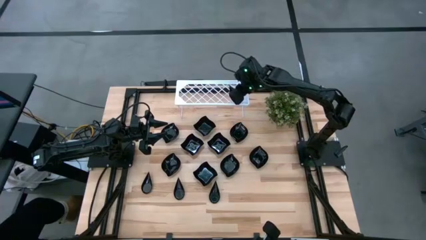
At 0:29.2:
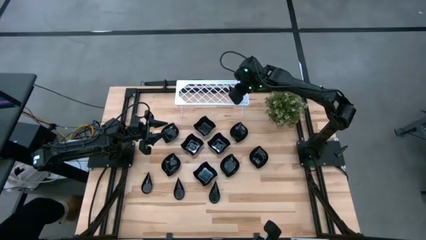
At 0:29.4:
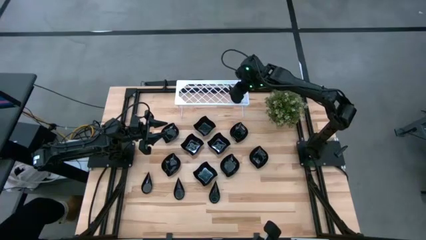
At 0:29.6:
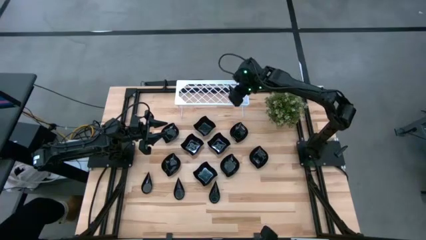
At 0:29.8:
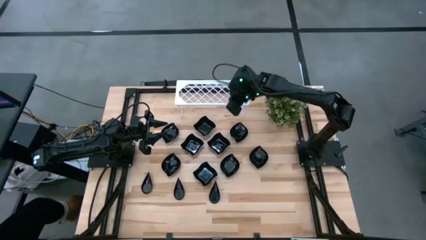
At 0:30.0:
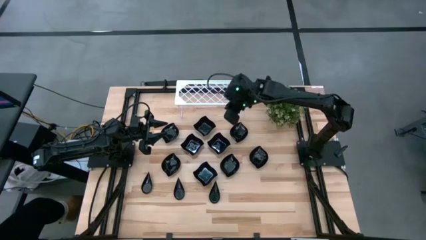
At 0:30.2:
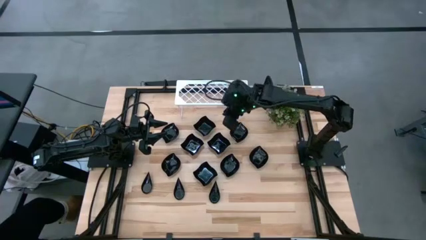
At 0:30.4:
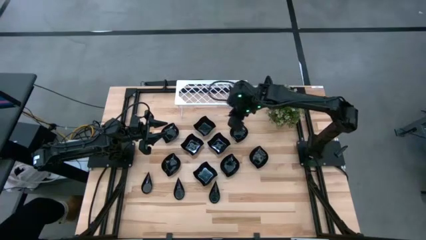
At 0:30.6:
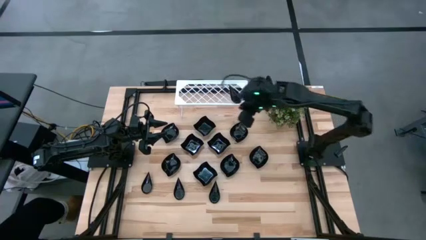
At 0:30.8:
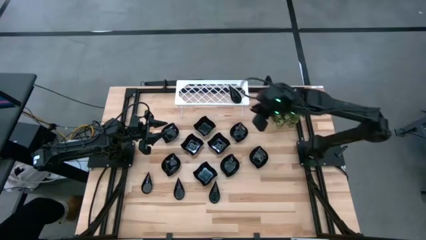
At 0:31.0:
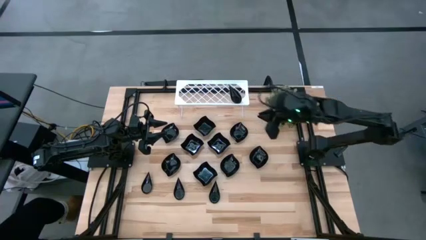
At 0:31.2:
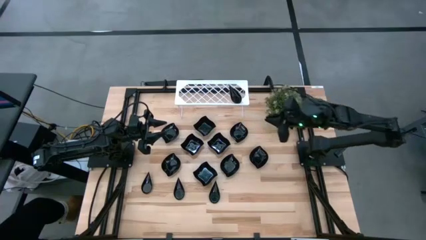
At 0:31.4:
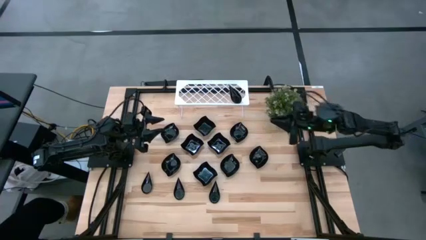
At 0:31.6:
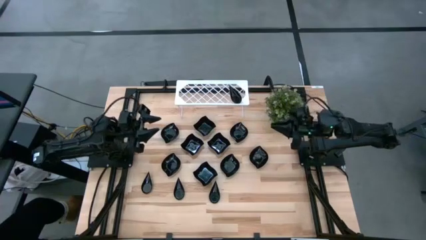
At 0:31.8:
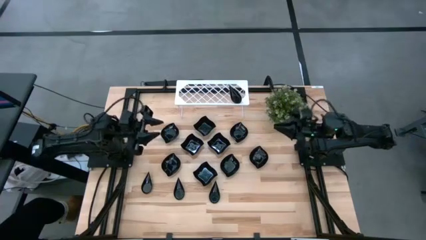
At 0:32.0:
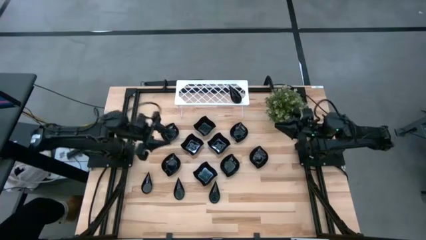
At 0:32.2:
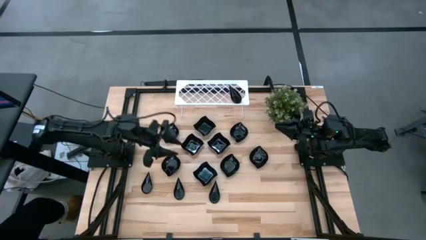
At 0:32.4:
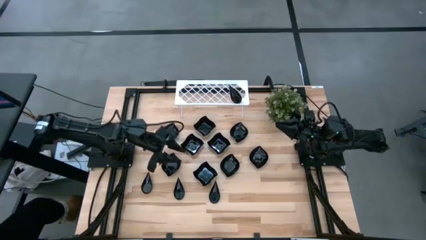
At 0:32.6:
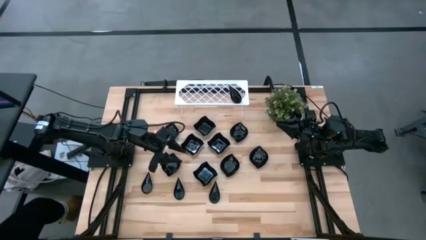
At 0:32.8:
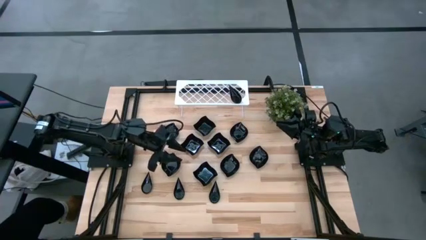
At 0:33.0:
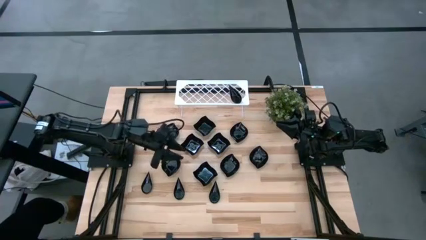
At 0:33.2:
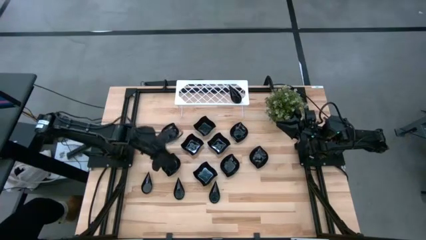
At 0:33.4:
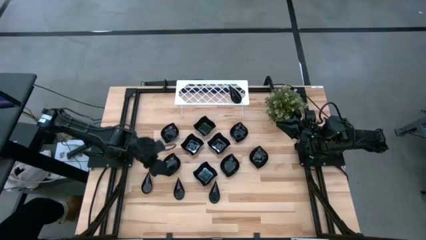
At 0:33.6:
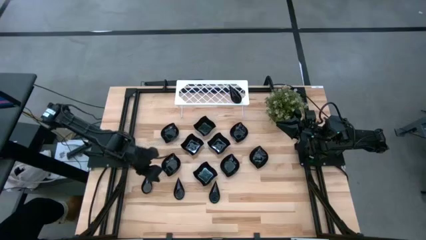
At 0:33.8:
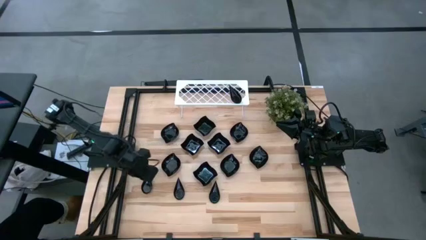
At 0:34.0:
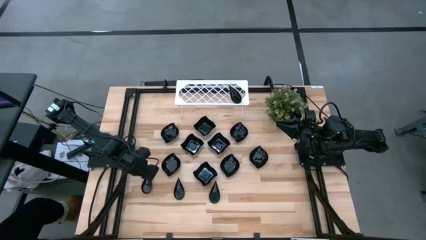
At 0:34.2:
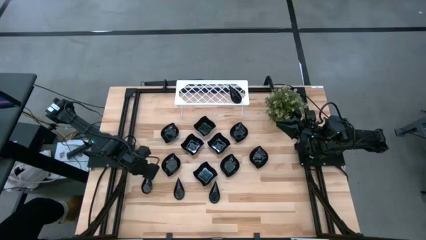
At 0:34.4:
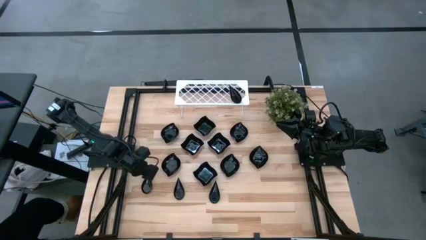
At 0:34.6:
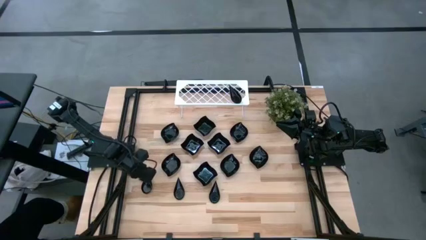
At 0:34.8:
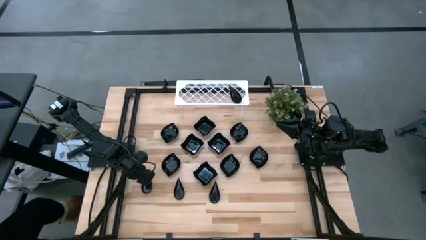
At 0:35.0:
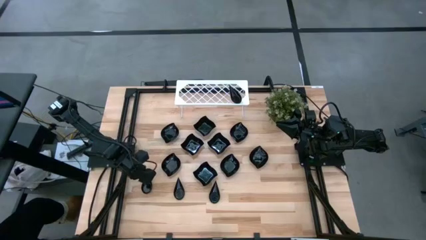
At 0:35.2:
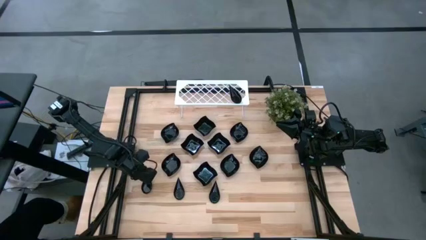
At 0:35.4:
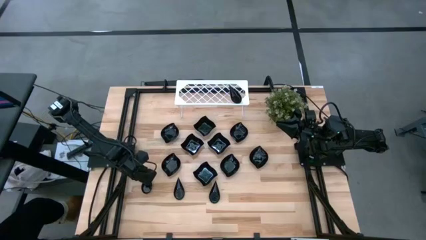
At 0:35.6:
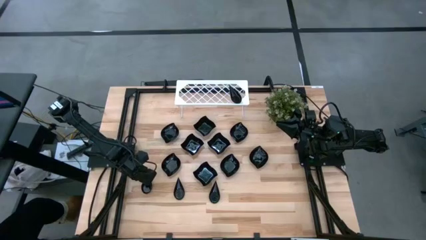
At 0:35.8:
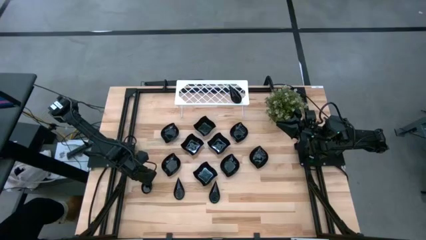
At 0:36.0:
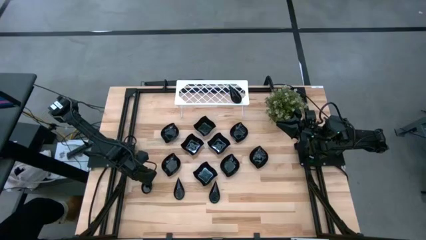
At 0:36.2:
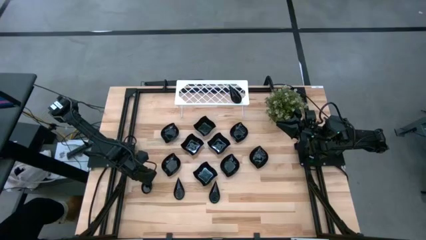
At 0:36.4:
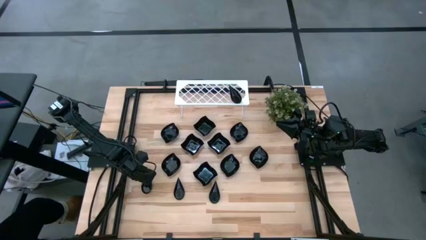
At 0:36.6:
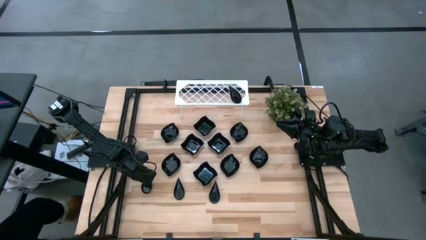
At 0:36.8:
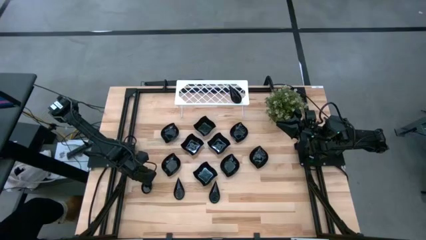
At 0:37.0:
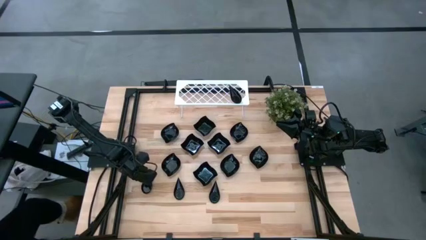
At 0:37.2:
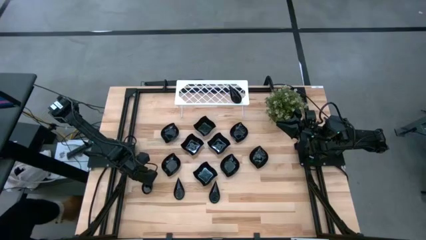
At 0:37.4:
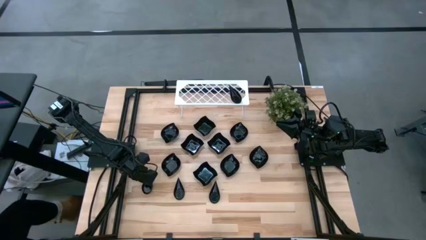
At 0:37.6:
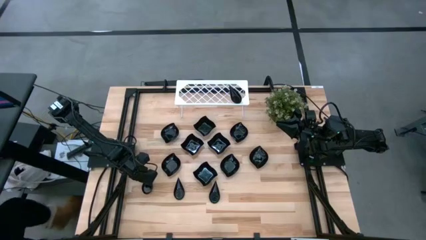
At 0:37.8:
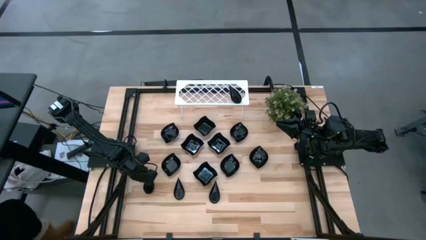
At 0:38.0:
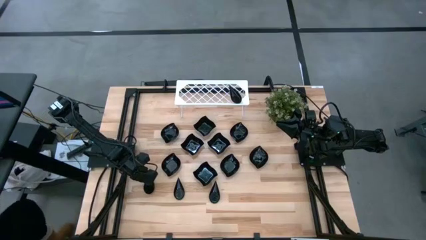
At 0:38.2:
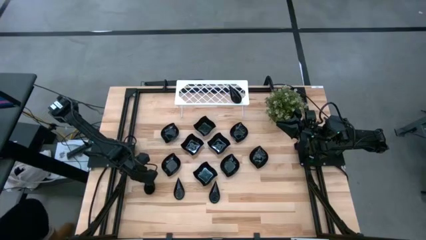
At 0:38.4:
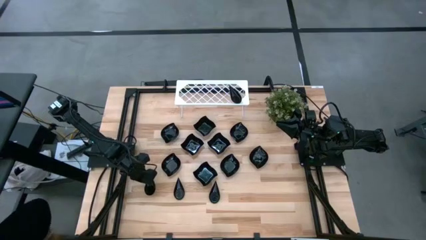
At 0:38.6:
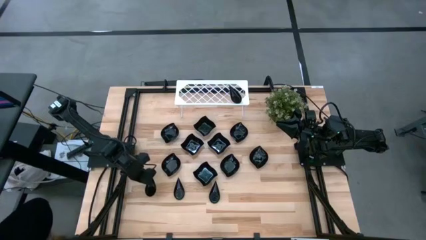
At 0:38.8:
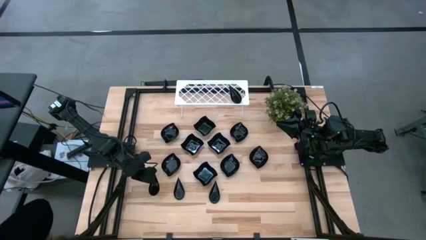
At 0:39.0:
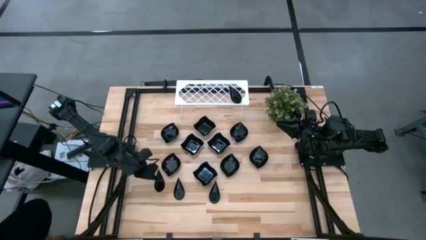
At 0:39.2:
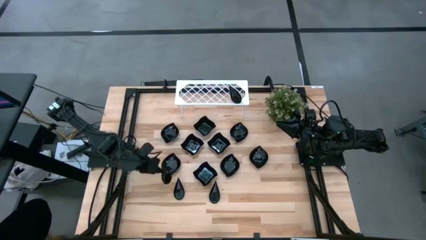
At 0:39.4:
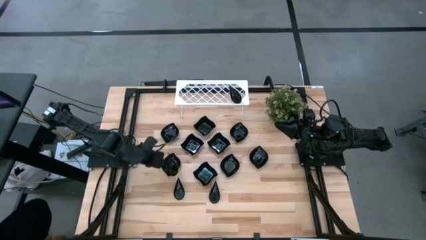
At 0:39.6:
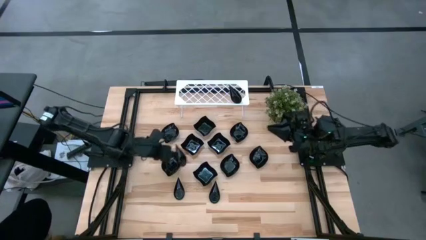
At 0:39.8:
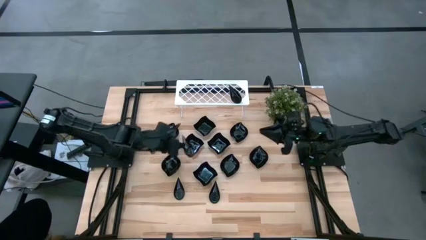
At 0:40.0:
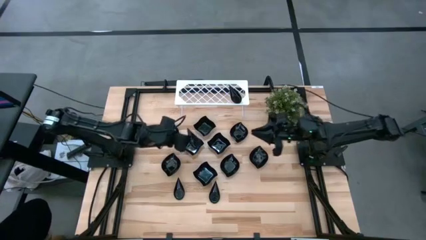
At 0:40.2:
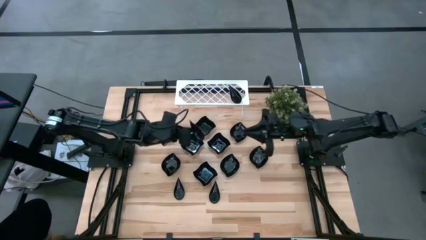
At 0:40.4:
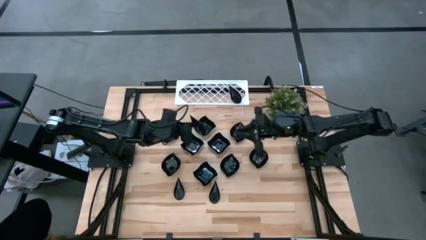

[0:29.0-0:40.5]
Task: Pick & Place Mini shaped plates
Stack the drop-shaped plate on top of the other drop-shaped plates on the shelf
